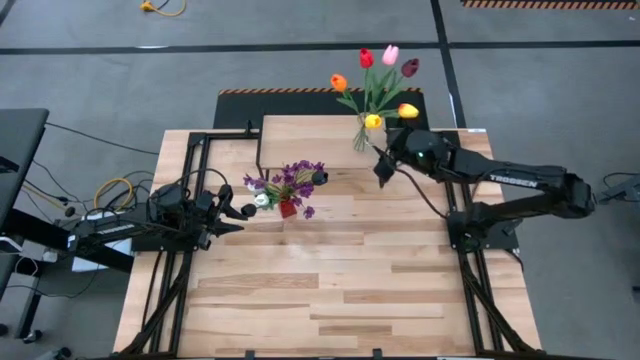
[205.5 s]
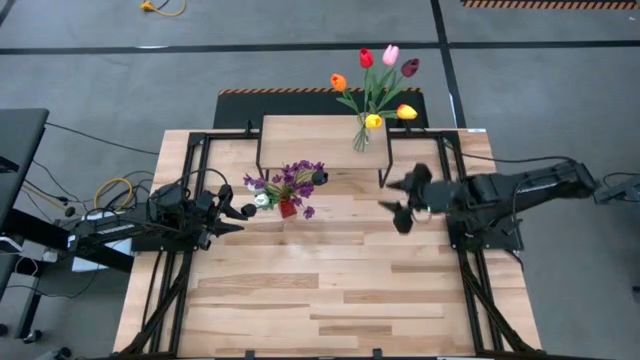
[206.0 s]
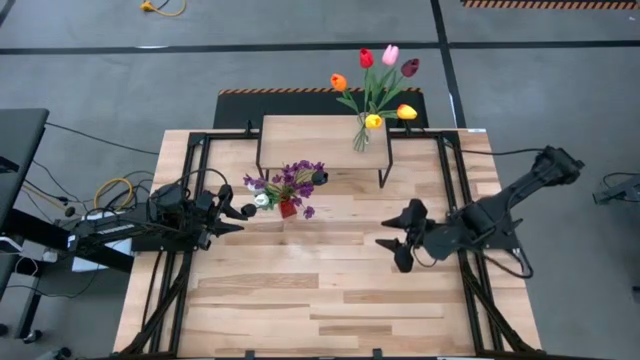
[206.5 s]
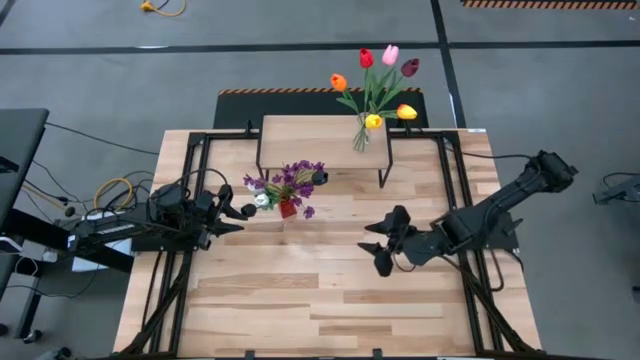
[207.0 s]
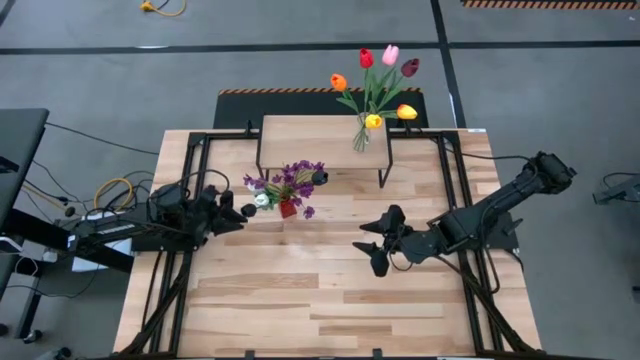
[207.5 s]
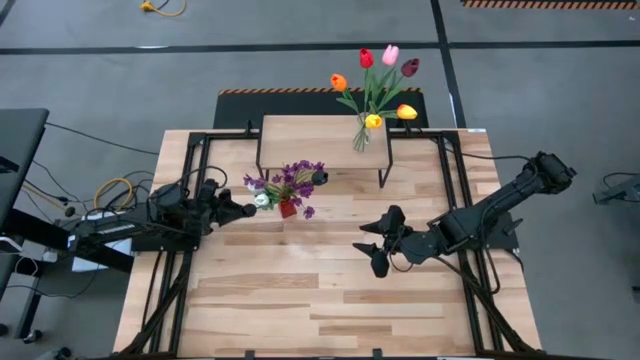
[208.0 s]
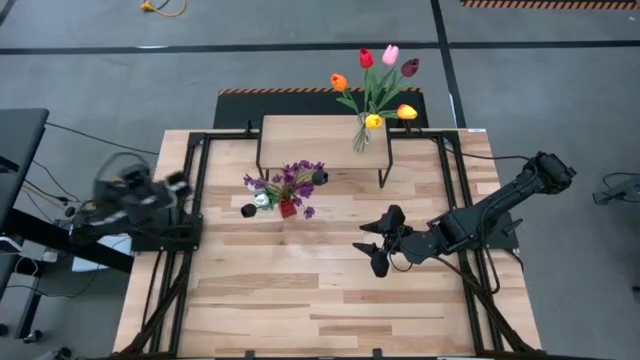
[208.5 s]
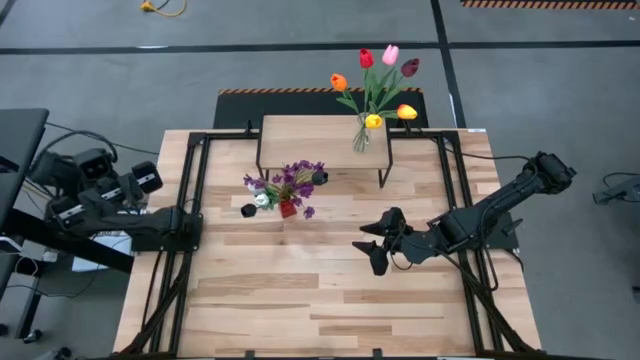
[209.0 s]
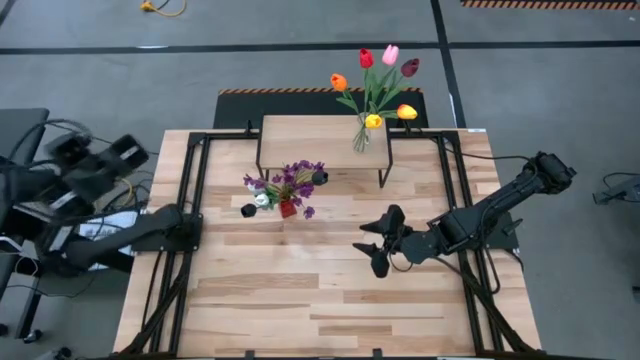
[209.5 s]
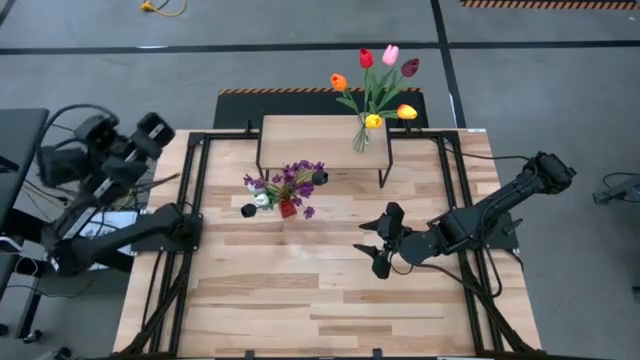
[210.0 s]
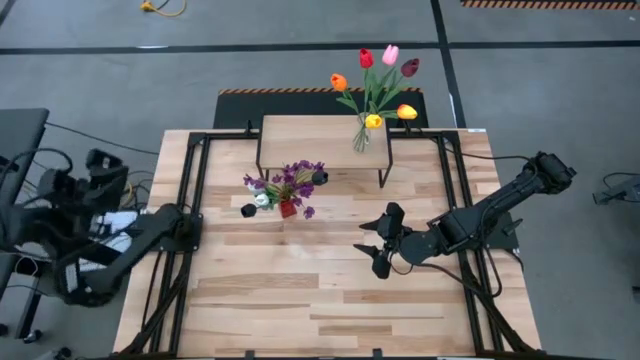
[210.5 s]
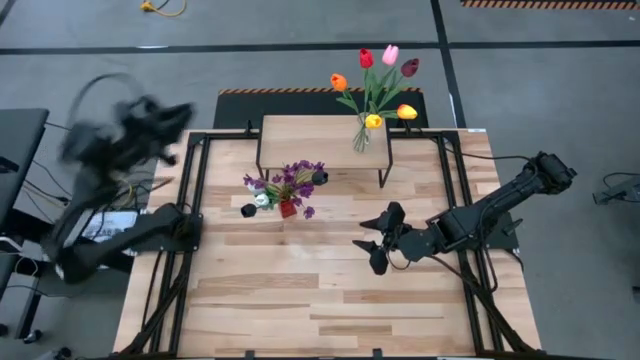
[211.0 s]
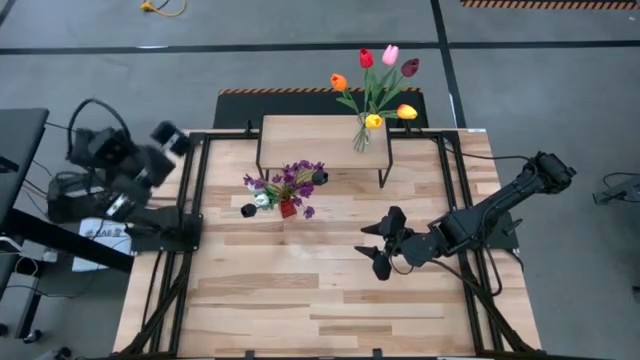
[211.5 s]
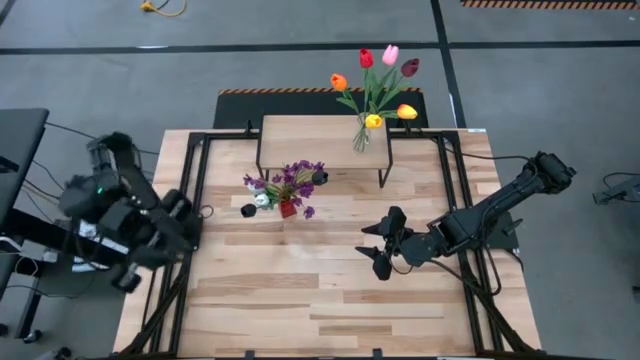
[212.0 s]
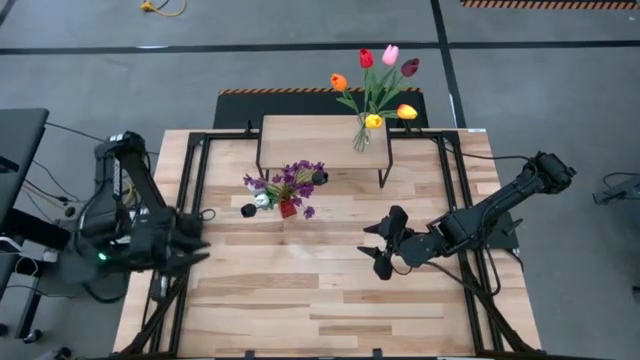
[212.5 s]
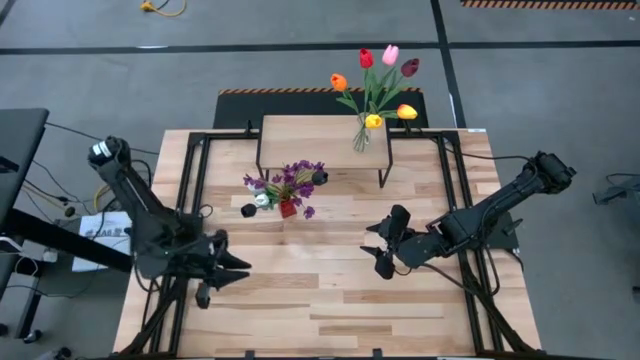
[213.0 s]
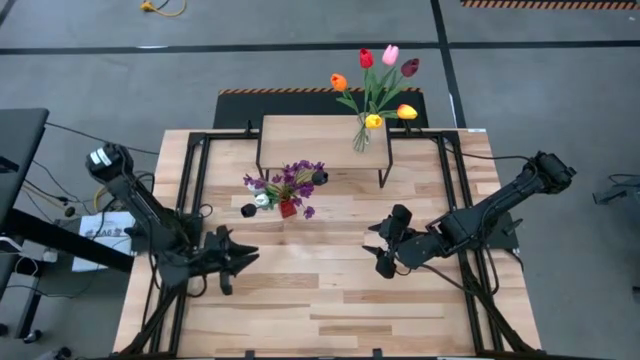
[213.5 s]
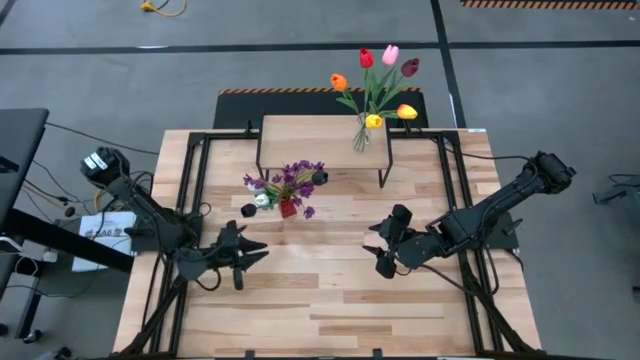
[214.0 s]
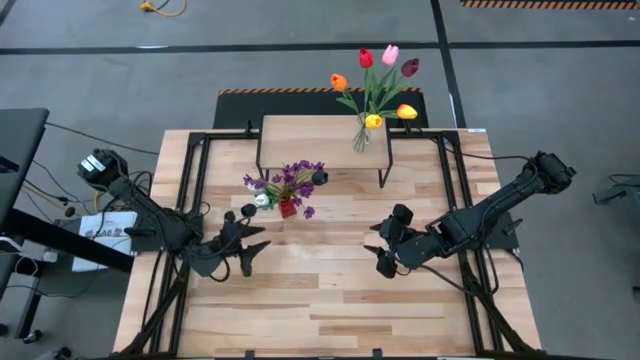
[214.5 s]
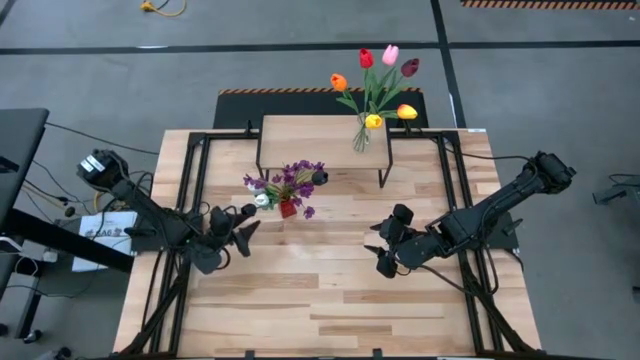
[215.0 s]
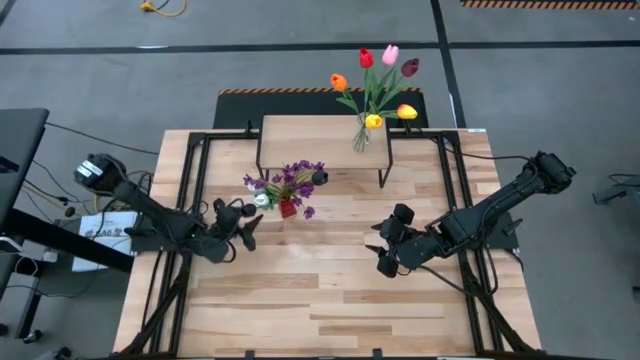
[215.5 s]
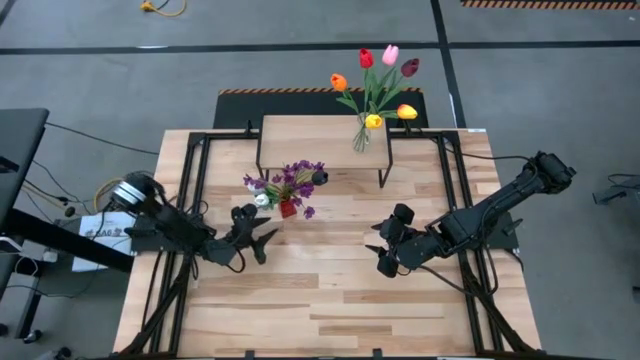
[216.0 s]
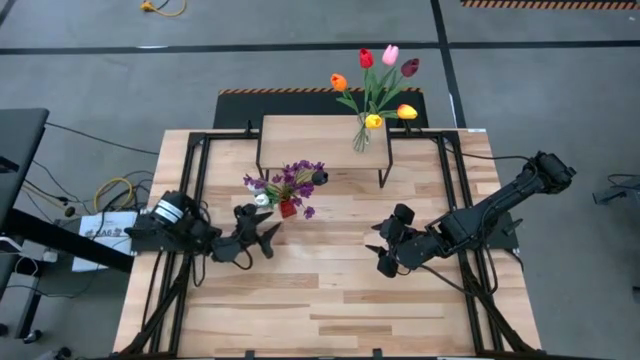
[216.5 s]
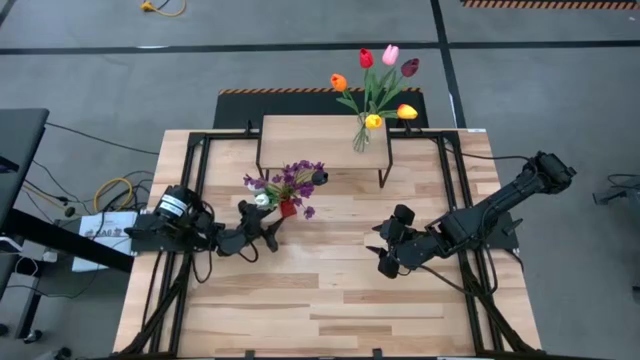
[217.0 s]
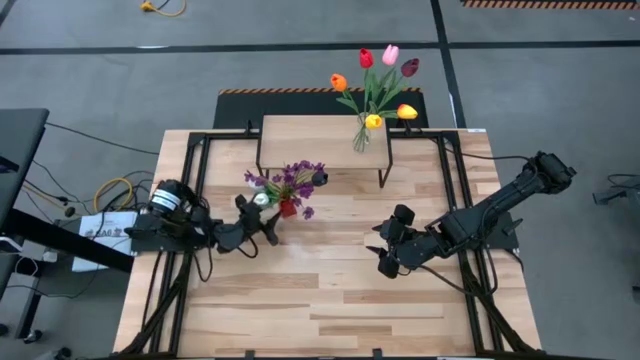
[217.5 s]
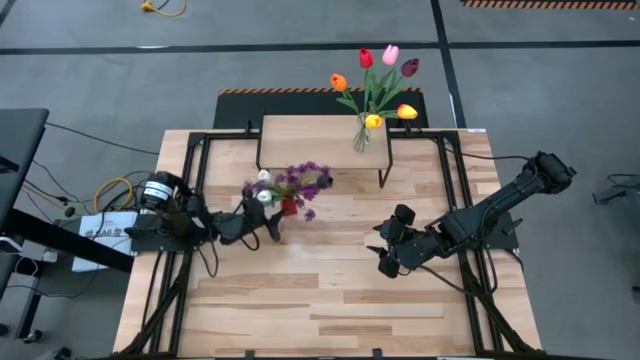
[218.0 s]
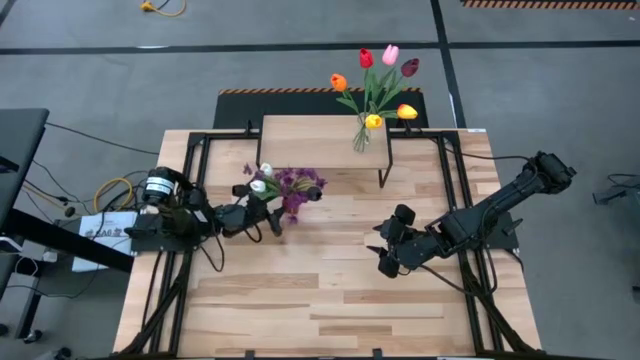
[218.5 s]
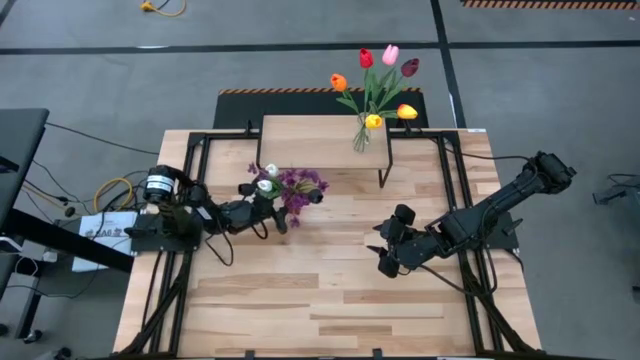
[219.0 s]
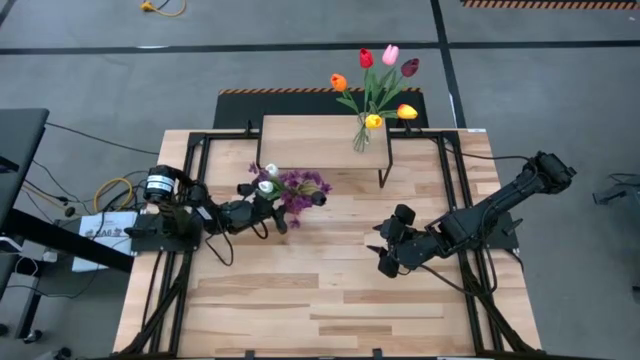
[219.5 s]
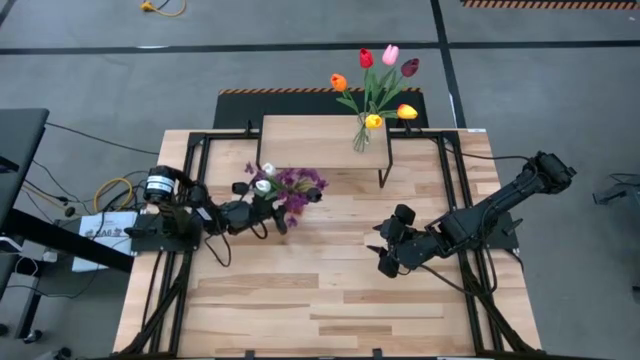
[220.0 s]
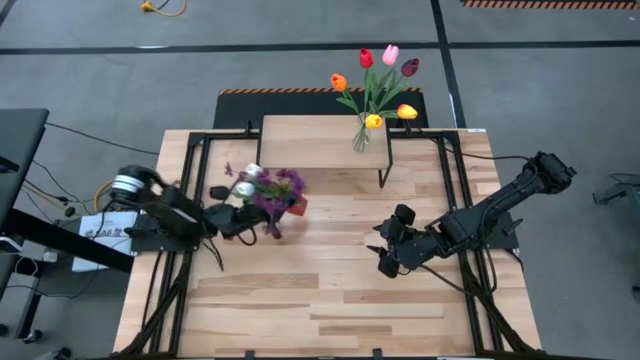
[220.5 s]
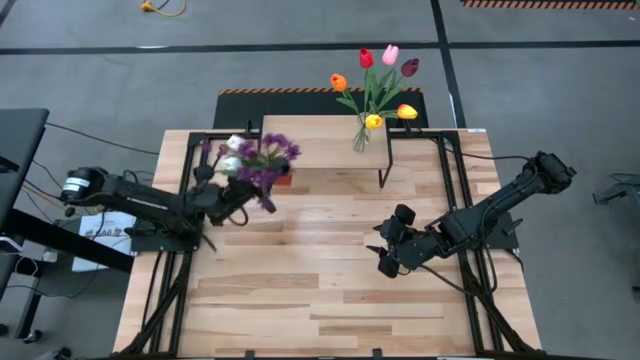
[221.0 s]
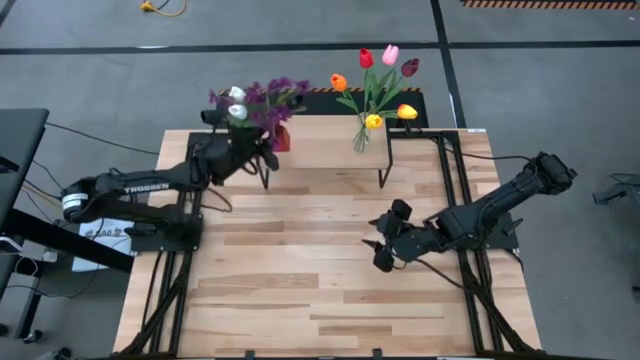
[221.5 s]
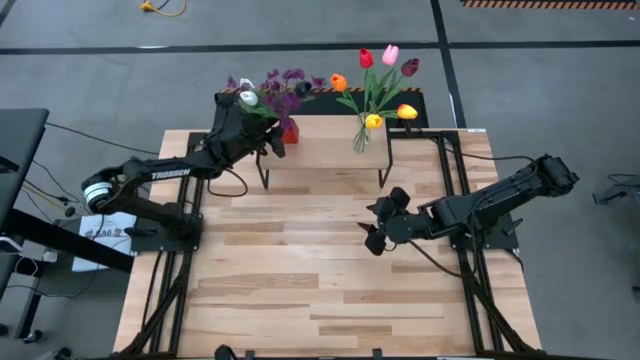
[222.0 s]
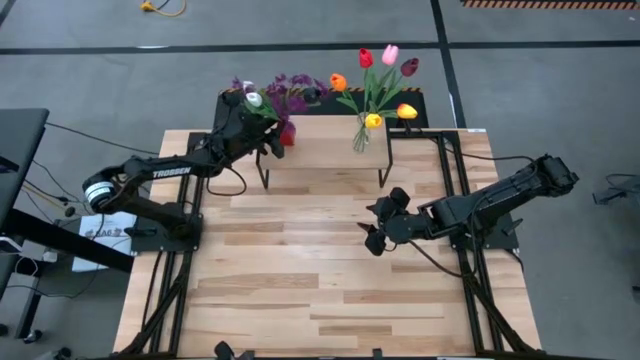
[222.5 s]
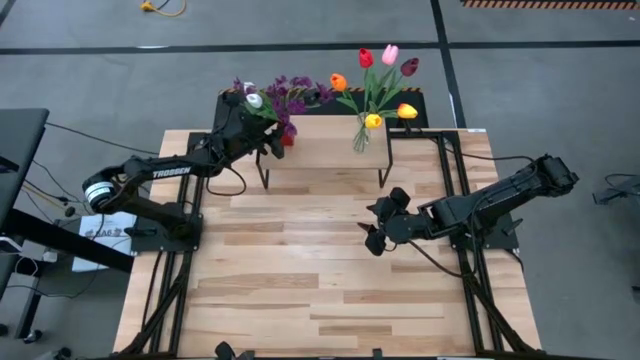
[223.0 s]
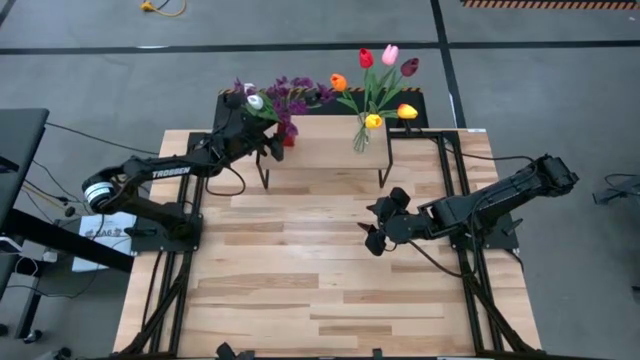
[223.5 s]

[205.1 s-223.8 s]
Task: Pick and place flowers into a vace then onto a shelf
Put the red vase with flowers on the shelf

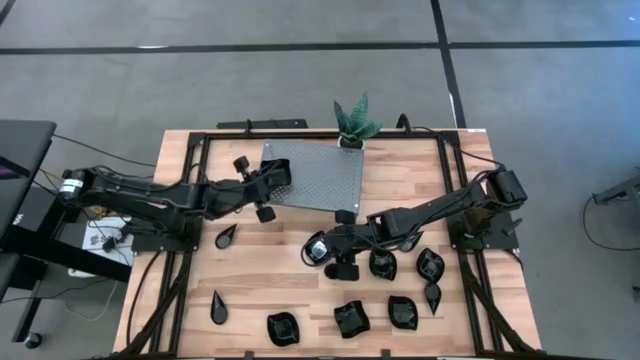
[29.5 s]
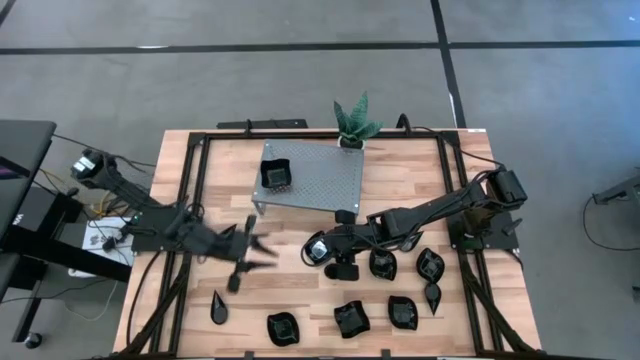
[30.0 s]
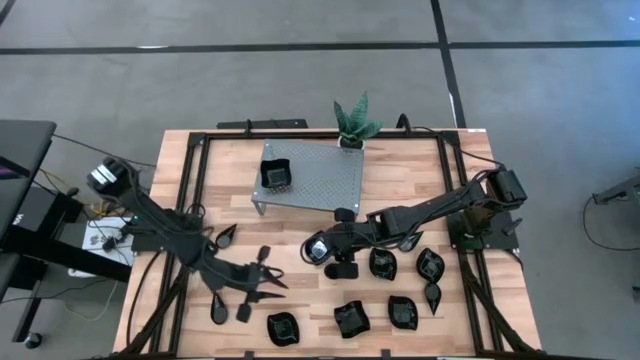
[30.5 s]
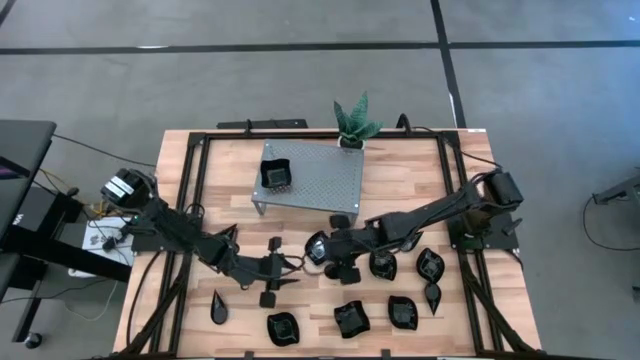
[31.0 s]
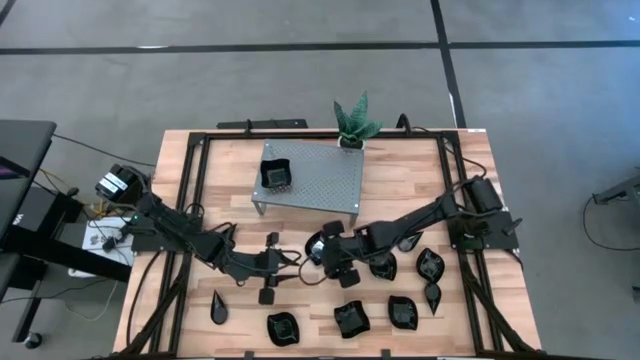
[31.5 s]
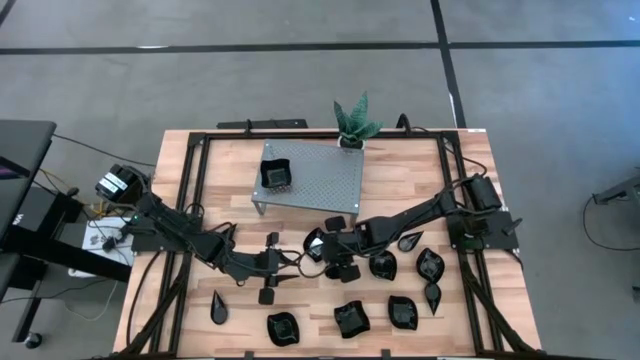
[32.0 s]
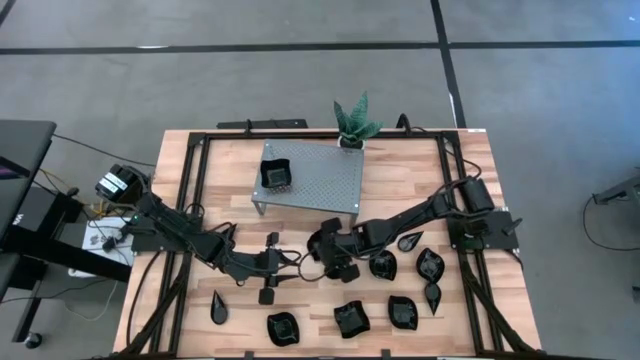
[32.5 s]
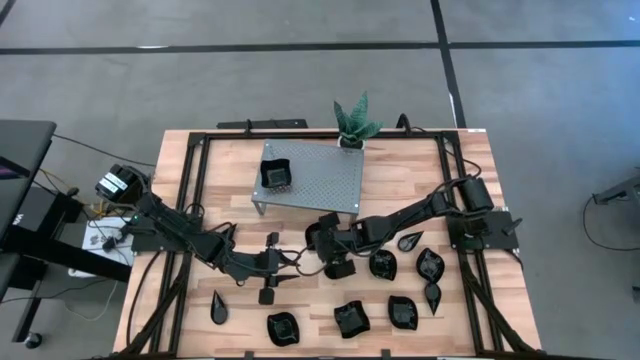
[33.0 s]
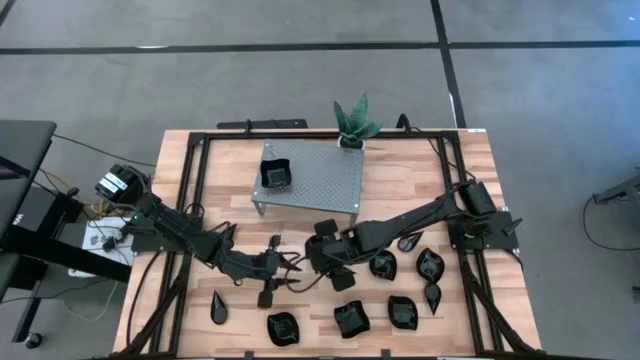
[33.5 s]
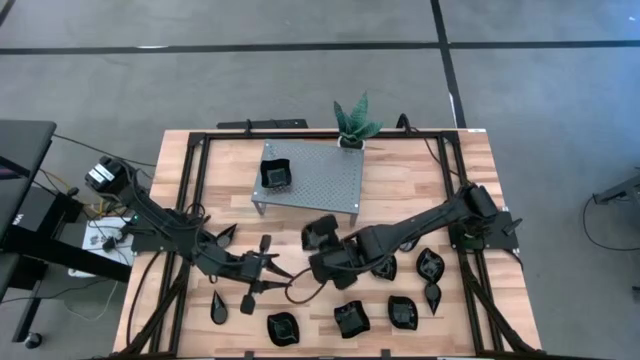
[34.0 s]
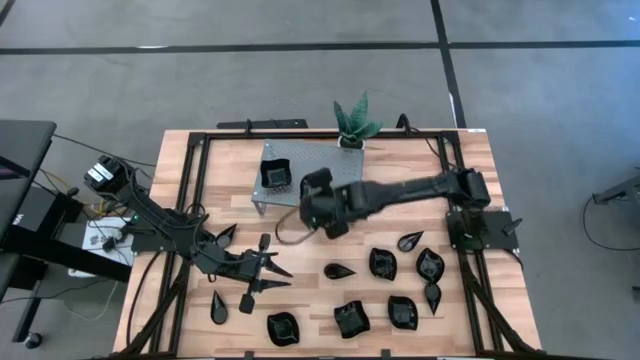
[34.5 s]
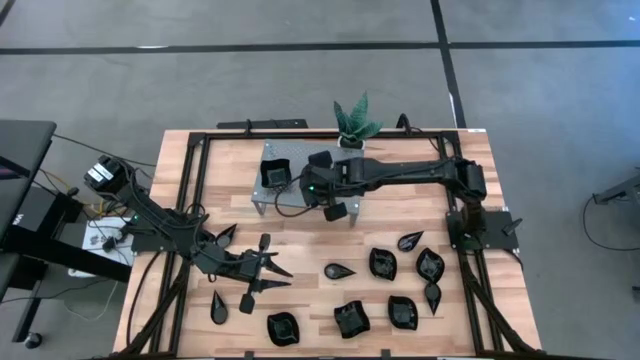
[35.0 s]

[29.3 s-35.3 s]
Task: Pick & Place Mini shaped plates
Put the black leaf shaped plate on the shelf
